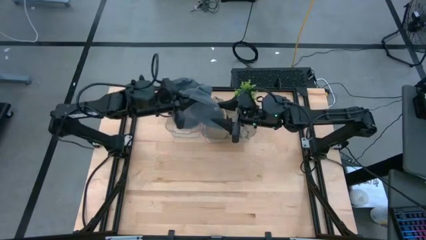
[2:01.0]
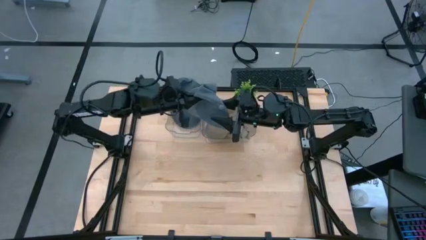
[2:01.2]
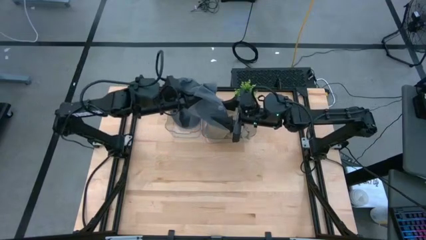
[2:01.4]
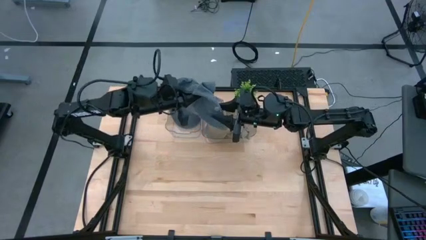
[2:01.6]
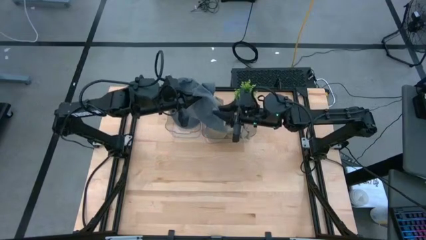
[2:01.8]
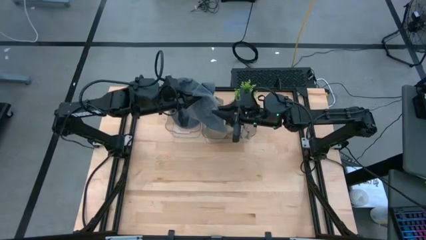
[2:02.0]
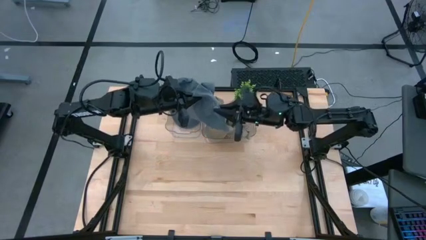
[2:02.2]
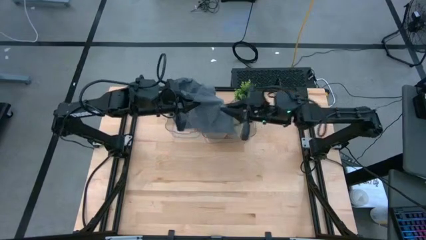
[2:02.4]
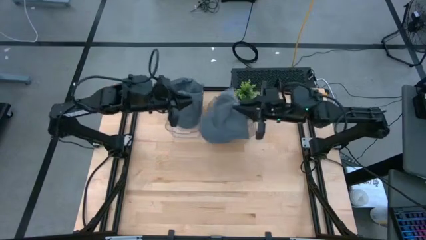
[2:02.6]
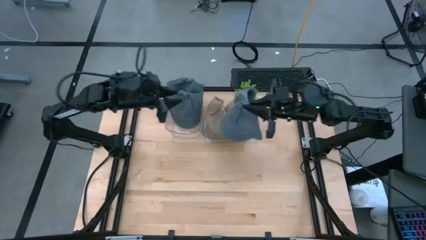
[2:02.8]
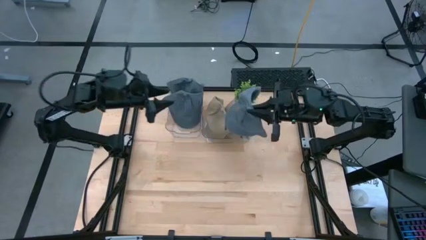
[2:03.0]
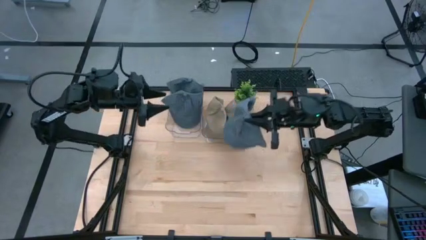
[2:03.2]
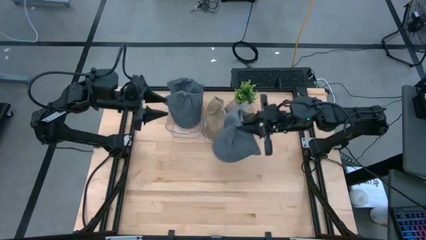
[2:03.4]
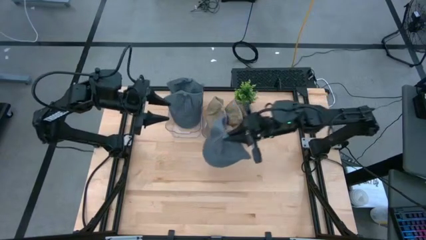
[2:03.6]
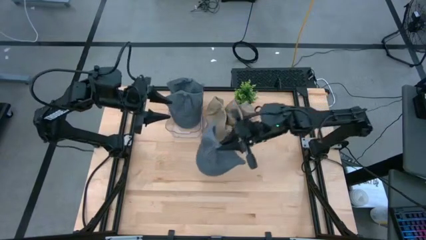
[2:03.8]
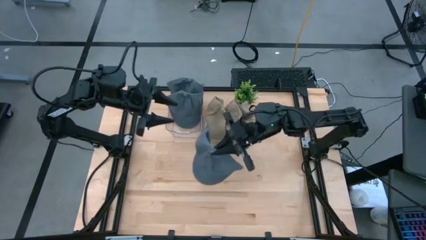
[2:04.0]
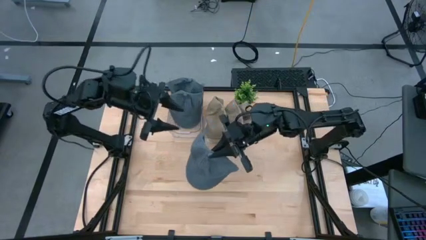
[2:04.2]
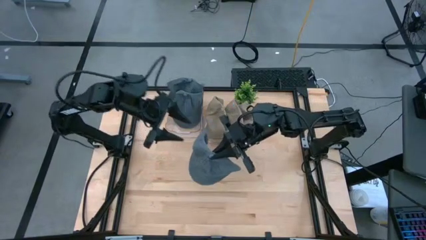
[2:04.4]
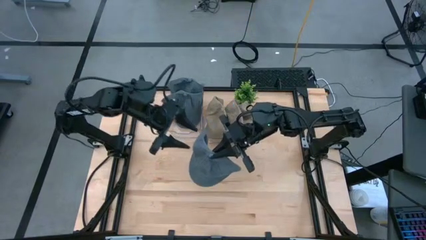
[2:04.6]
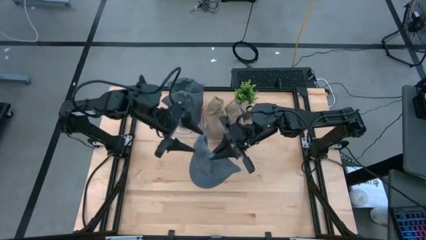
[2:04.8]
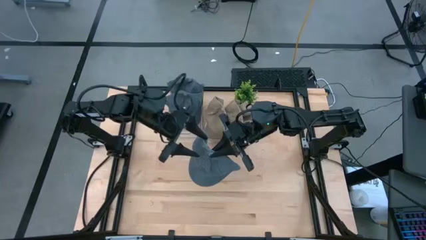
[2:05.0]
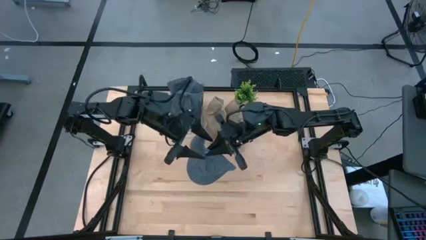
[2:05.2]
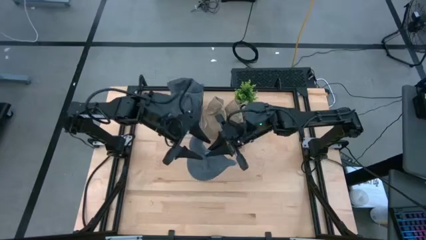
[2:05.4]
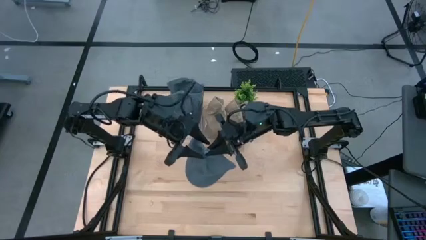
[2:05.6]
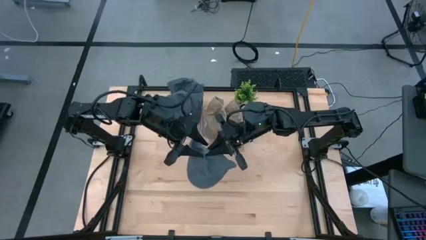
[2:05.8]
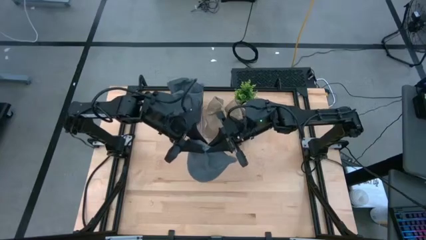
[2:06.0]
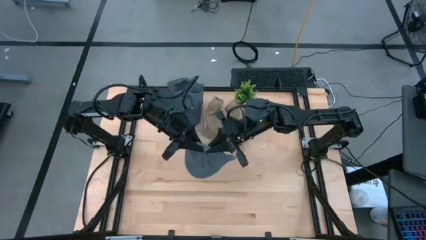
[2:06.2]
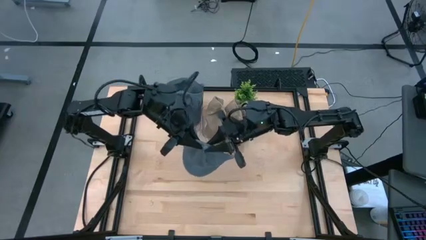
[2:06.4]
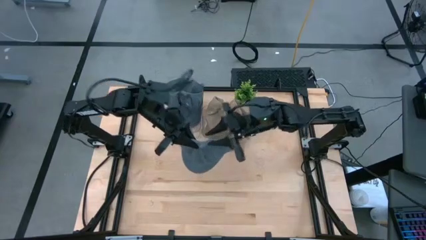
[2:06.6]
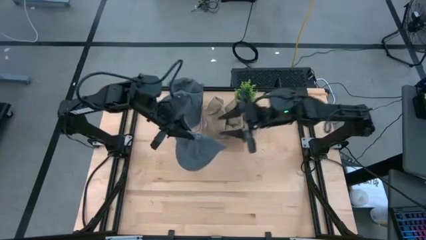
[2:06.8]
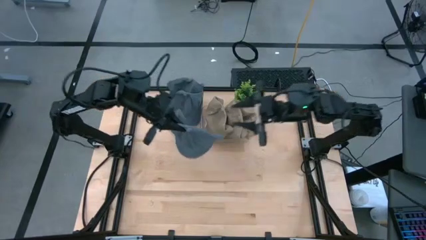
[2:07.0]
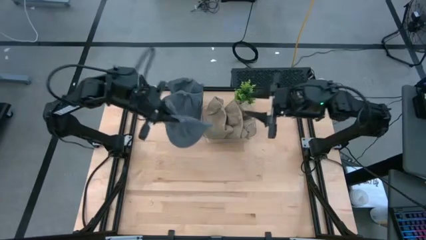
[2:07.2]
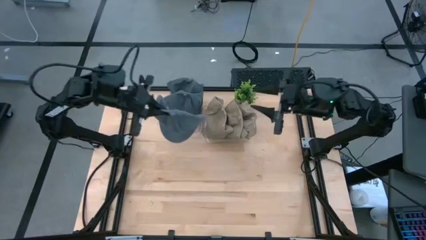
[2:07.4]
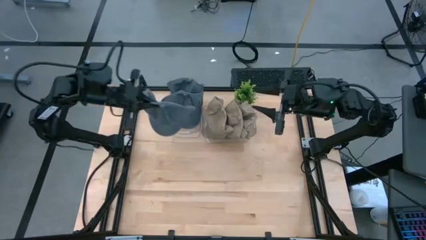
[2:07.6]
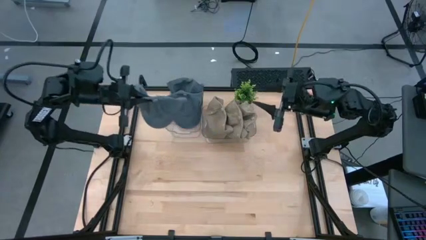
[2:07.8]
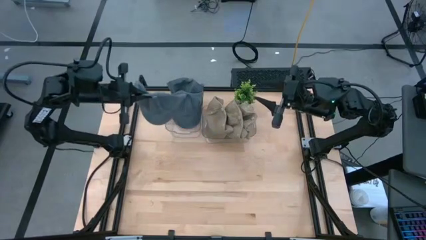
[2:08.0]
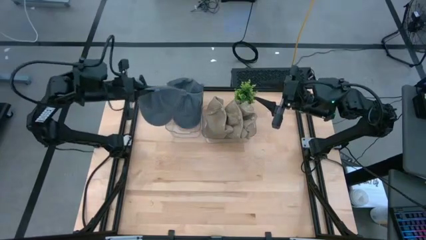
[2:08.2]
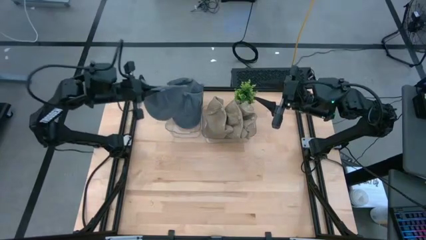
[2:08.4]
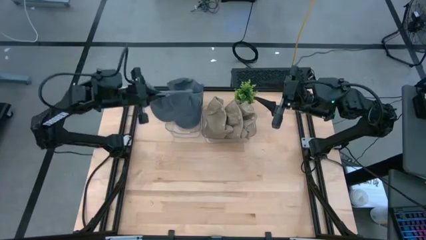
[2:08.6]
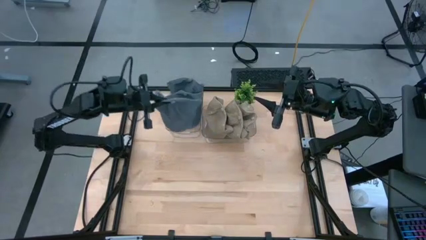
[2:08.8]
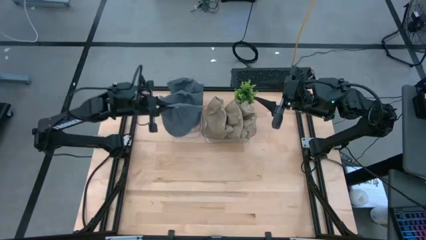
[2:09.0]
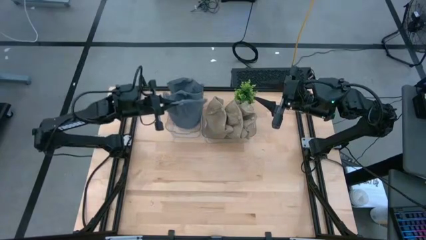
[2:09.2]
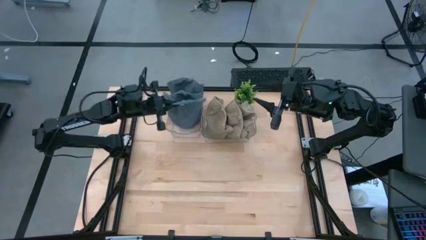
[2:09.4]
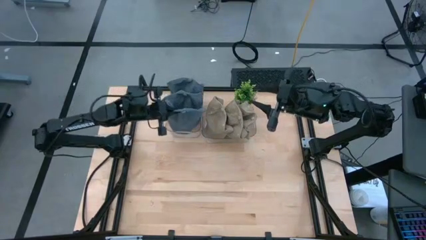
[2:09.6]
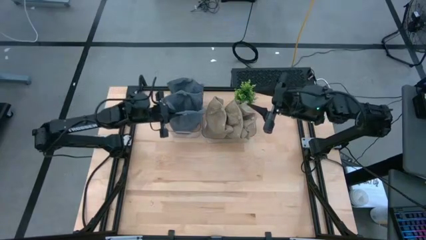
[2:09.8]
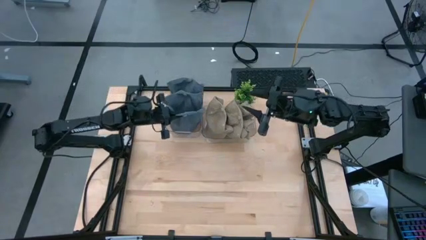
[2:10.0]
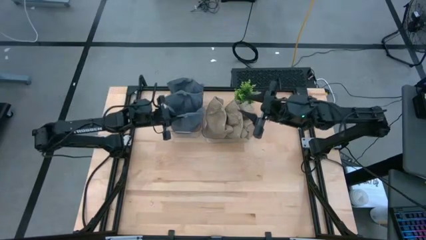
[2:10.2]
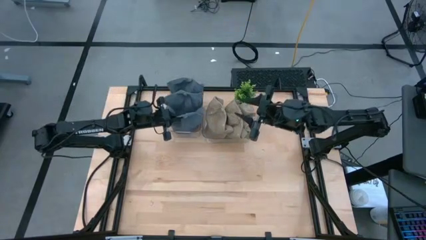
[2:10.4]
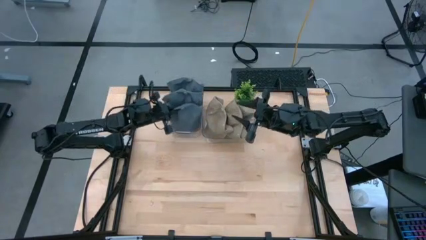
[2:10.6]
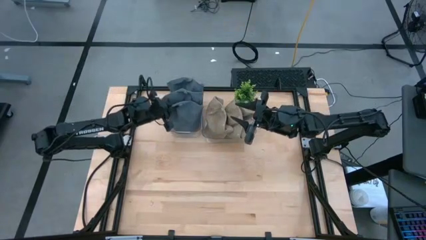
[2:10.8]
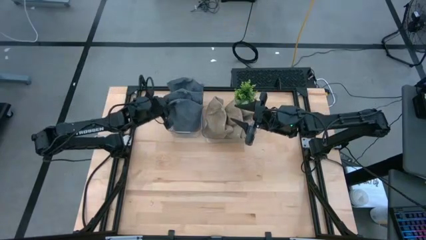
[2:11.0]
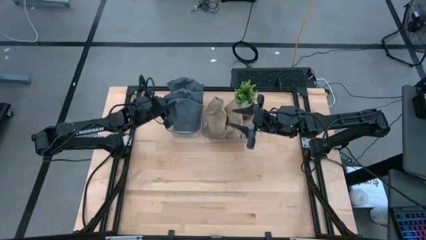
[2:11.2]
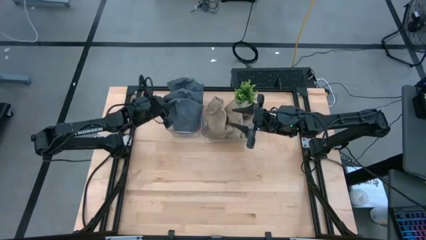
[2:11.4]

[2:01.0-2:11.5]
Task: Pick & Place hat
Put the blue cap into the left transparent bin

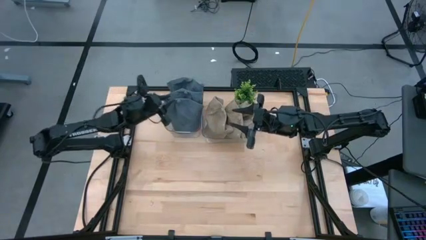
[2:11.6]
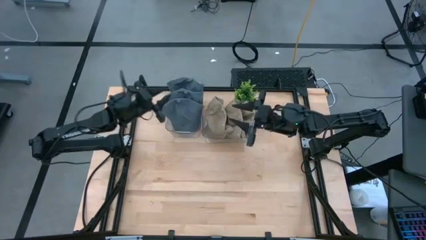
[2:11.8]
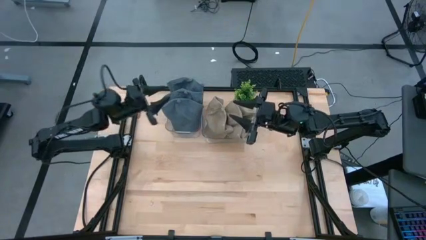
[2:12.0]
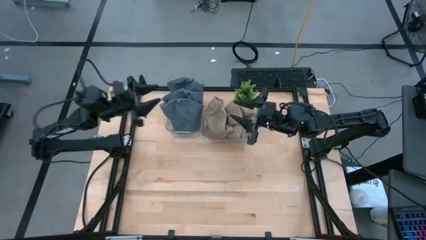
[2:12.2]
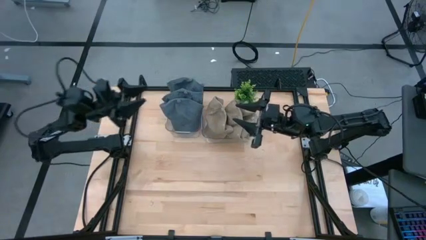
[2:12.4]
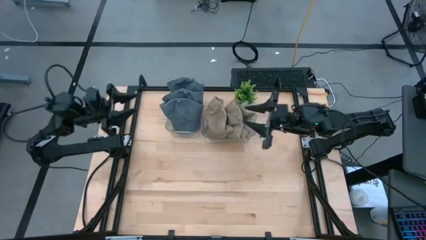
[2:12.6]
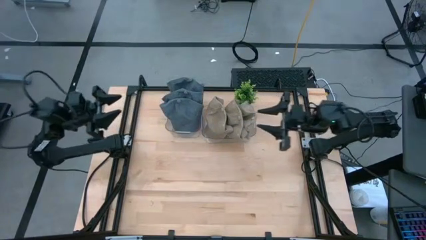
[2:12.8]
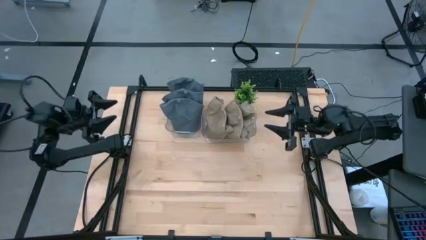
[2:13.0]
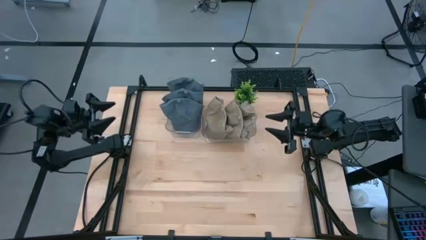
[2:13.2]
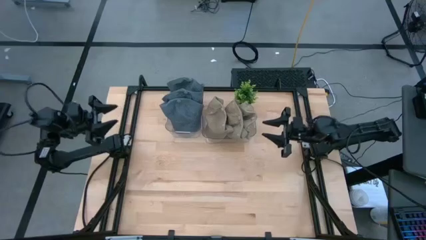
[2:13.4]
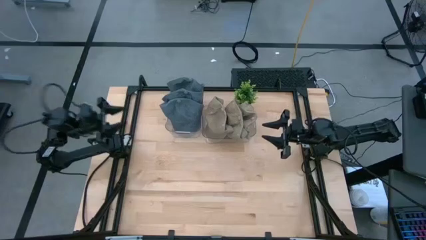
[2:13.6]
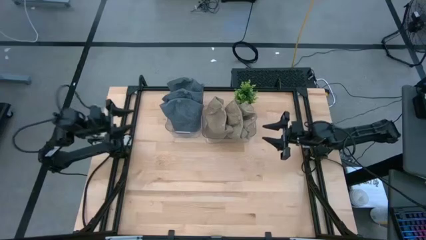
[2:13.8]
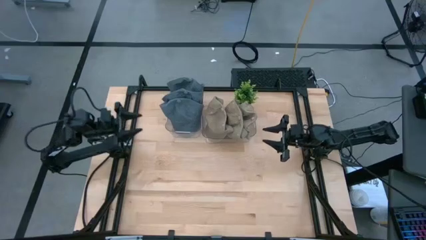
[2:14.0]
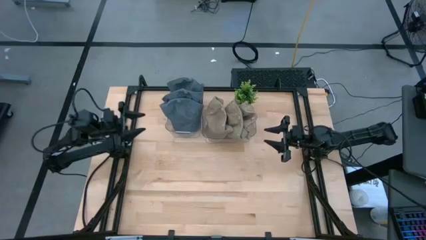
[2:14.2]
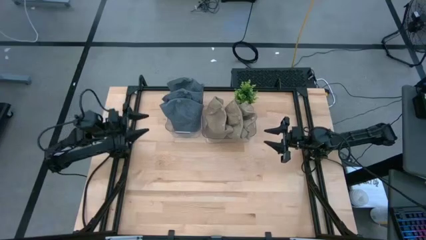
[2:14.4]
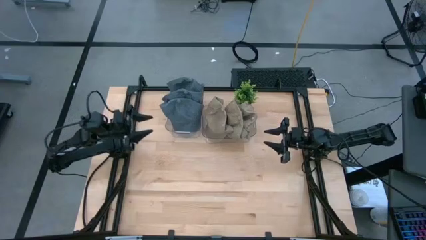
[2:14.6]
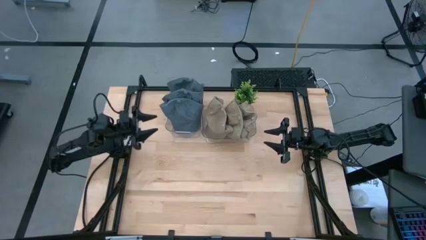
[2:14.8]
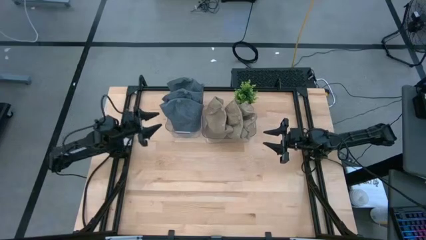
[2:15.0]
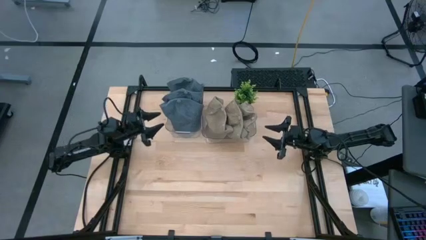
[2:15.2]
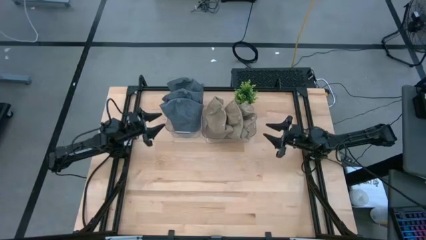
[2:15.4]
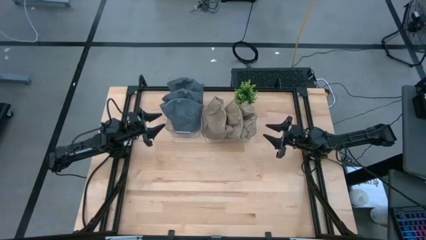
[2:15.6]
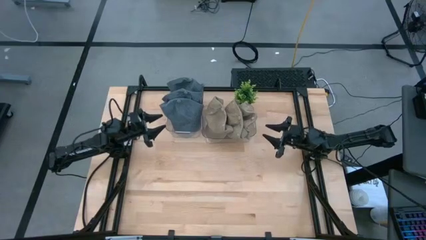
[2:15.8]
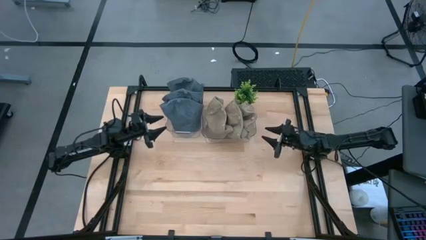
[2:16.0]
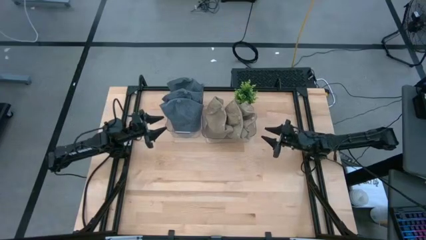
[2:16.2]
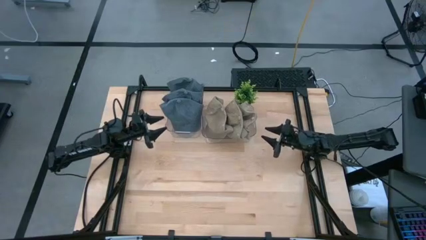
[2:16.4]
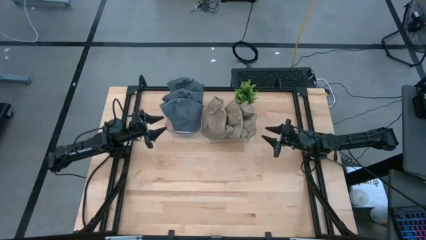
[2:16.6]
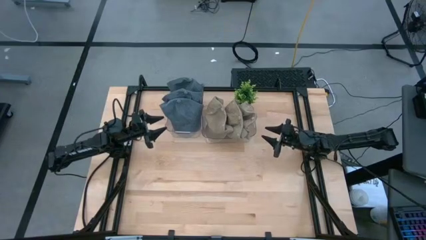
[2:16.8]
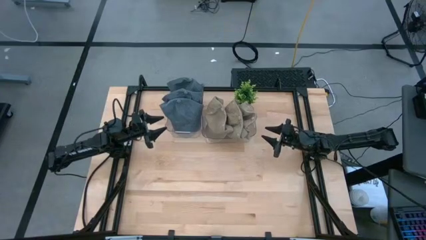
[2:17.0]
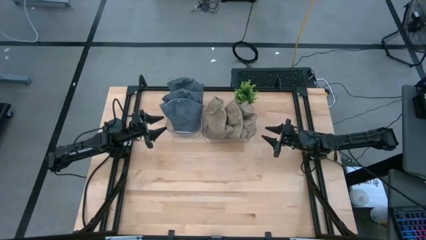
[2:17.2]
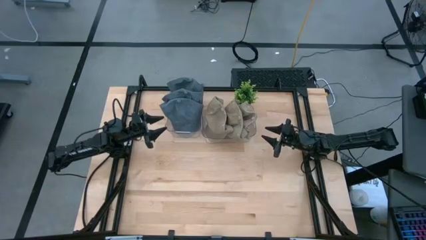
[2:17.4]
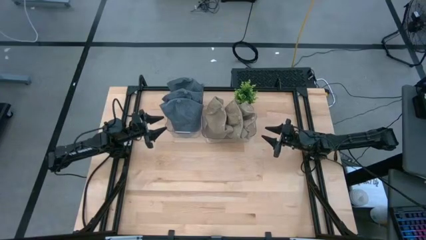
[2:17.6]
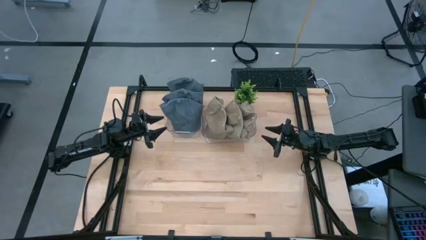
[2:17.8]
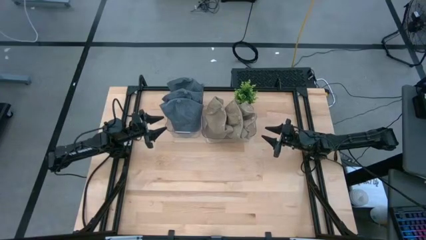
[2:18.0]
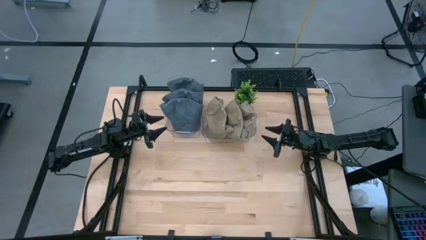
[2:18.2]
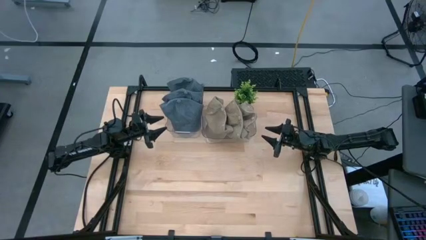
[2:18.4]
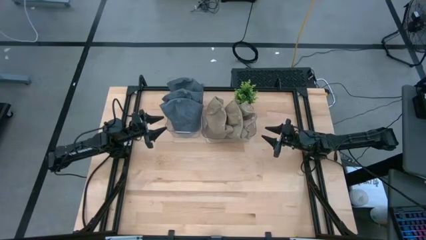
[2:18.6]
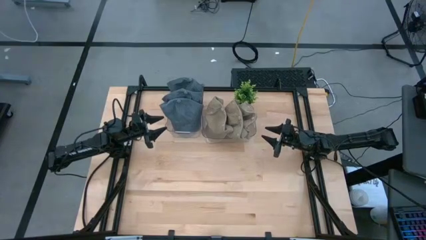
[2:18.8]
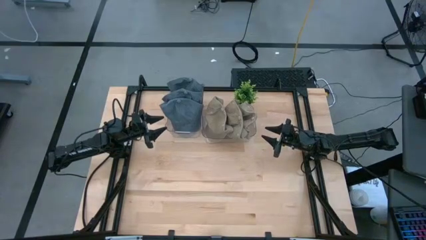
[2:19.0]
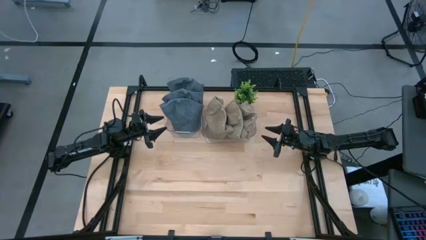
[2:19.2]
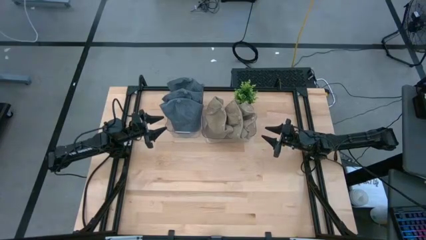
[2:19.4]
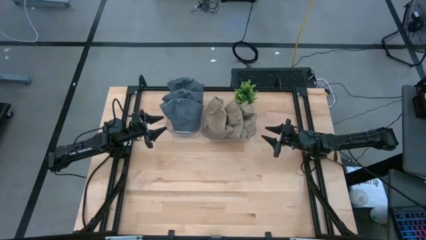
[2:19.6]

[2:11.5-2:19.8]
Return to Home Position
